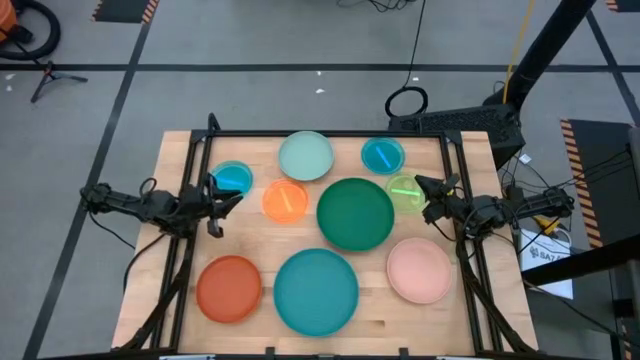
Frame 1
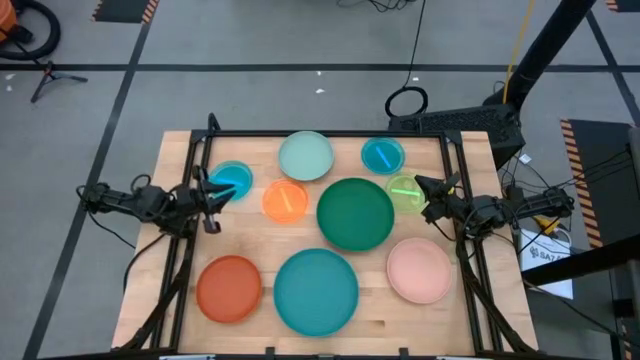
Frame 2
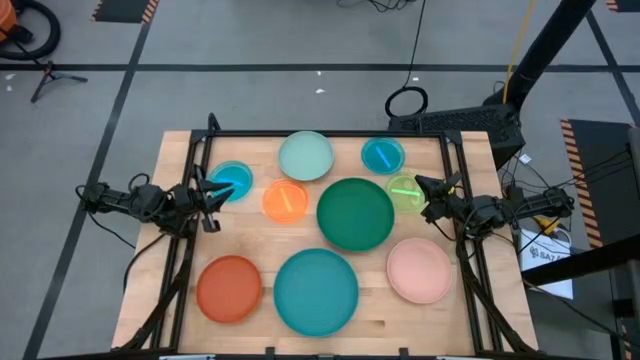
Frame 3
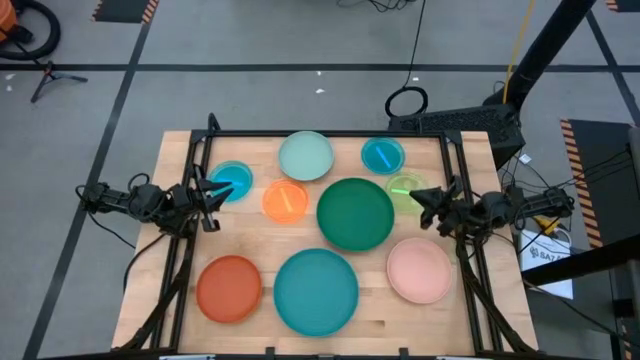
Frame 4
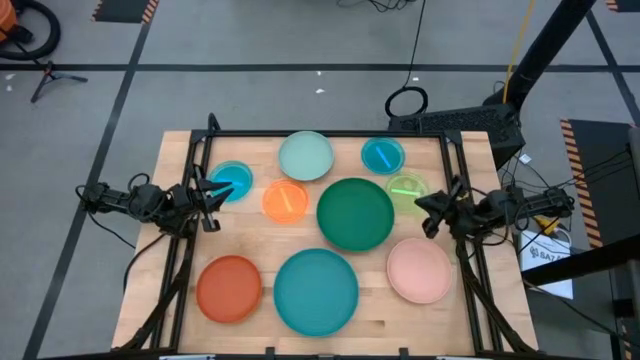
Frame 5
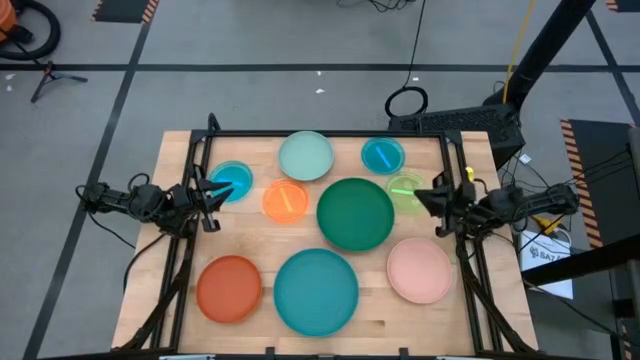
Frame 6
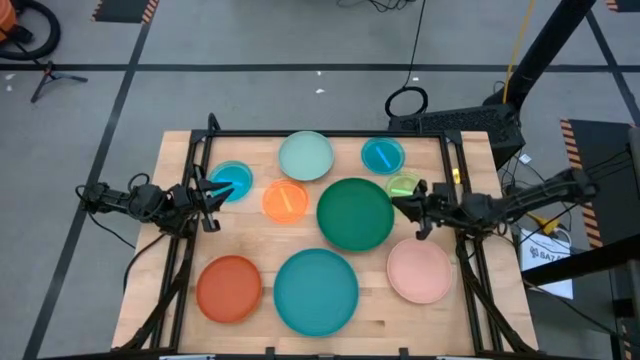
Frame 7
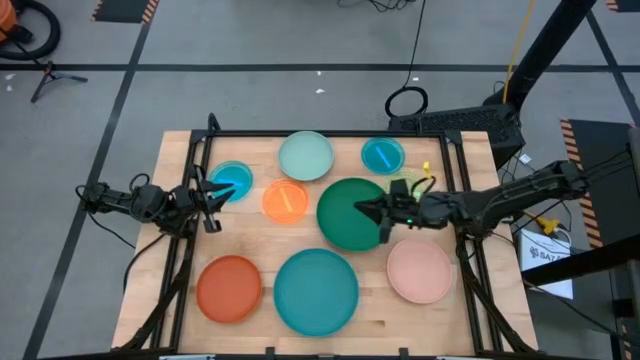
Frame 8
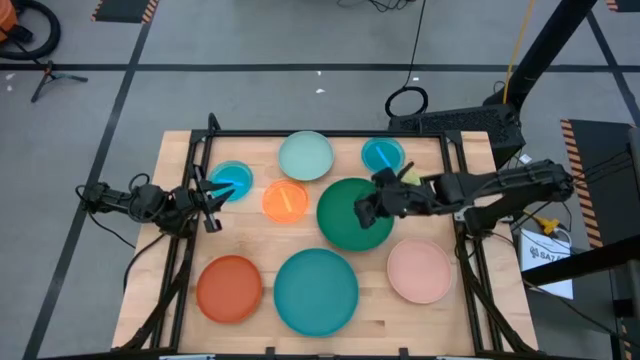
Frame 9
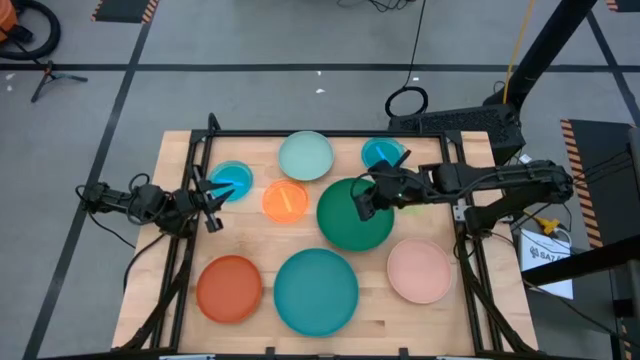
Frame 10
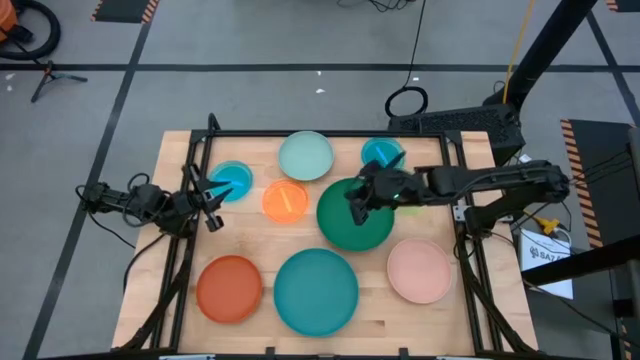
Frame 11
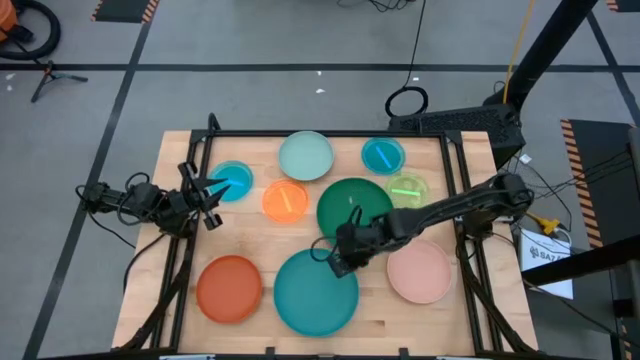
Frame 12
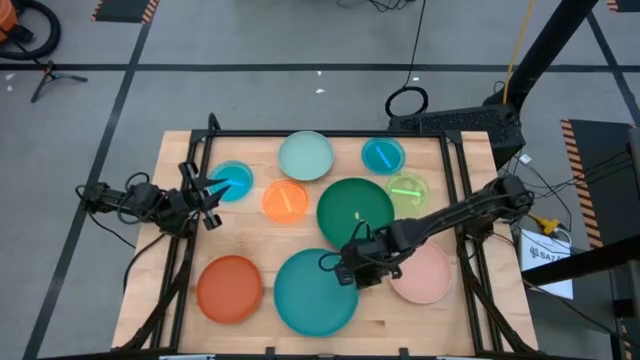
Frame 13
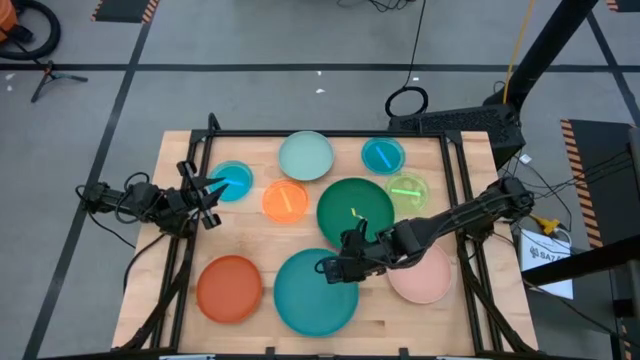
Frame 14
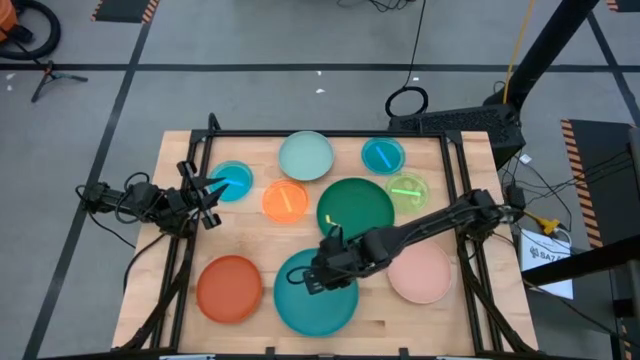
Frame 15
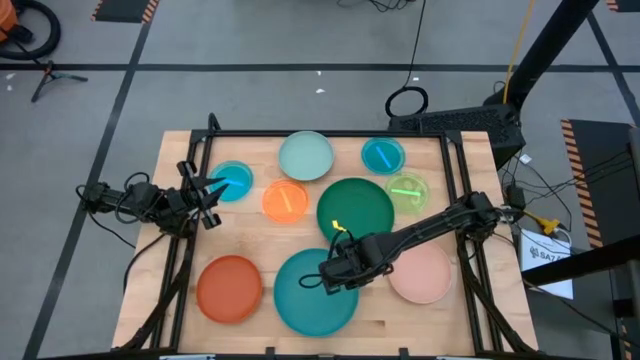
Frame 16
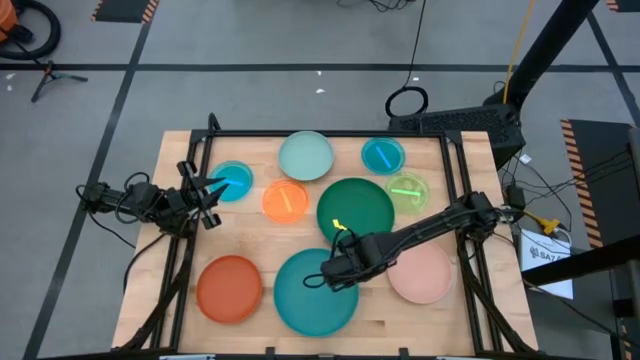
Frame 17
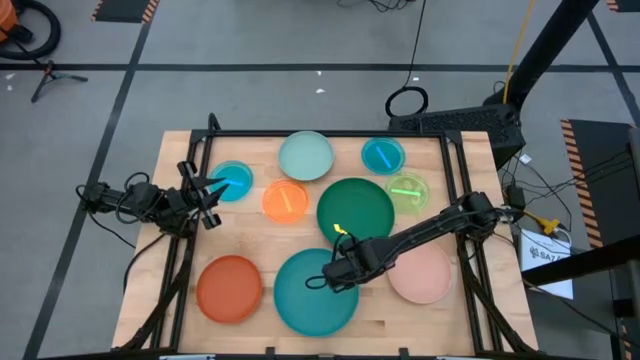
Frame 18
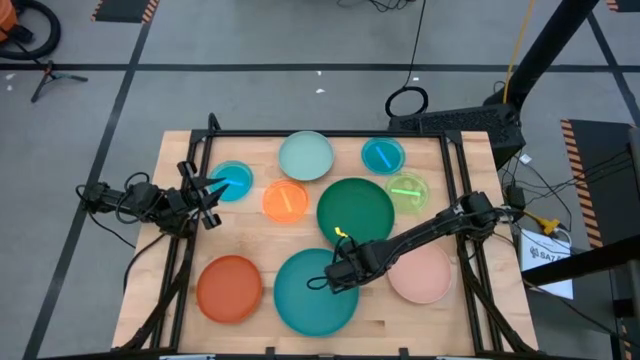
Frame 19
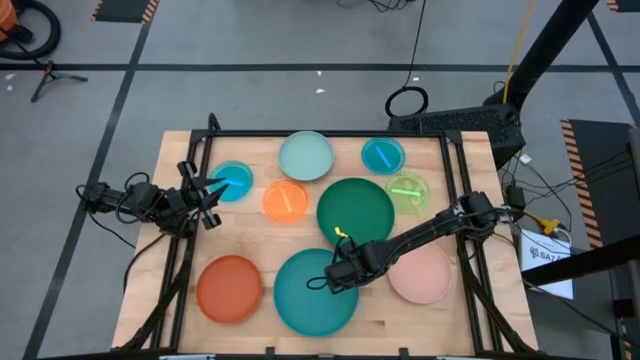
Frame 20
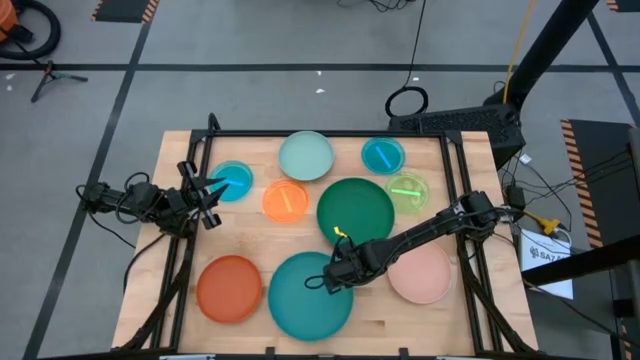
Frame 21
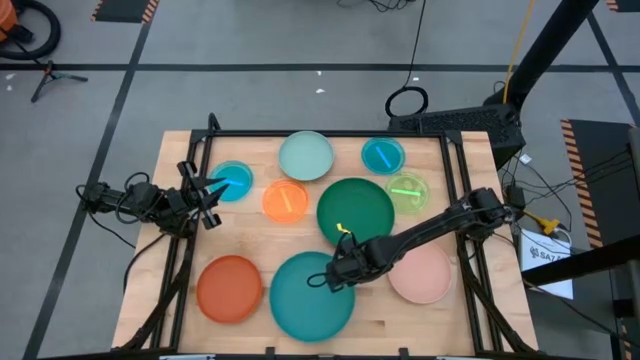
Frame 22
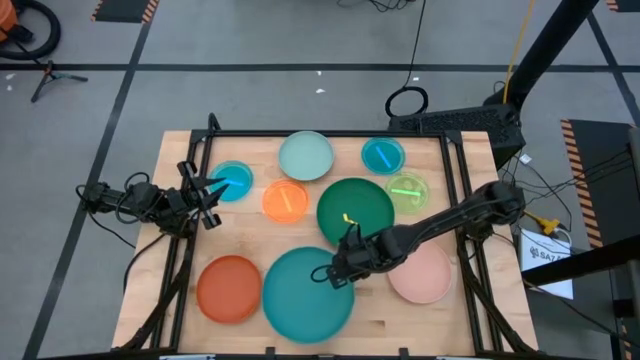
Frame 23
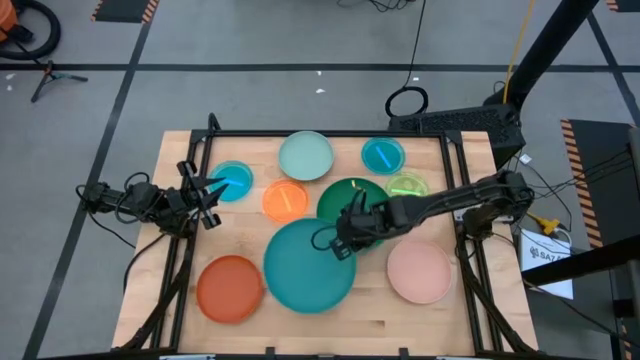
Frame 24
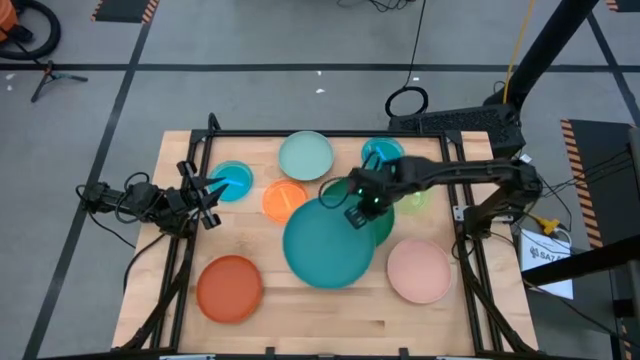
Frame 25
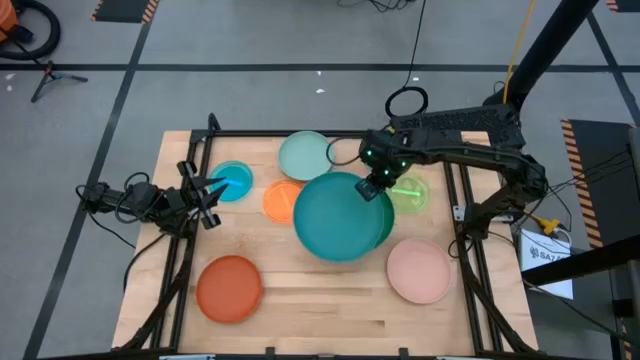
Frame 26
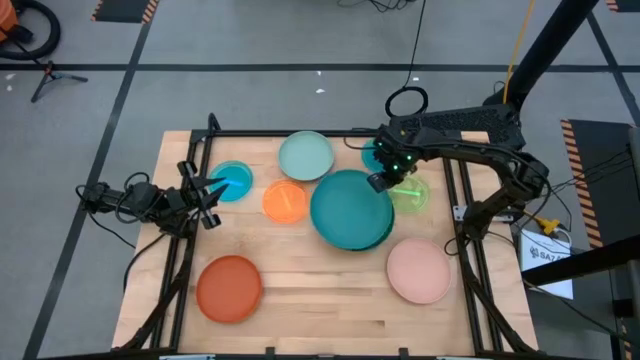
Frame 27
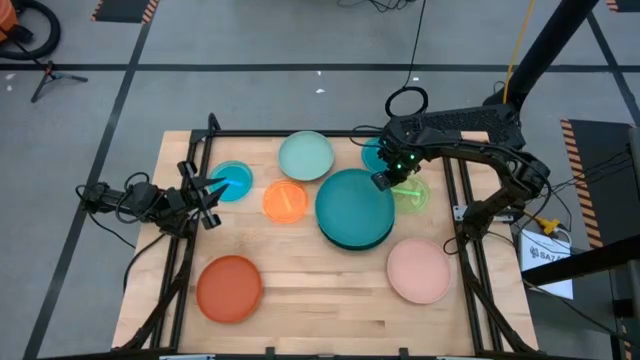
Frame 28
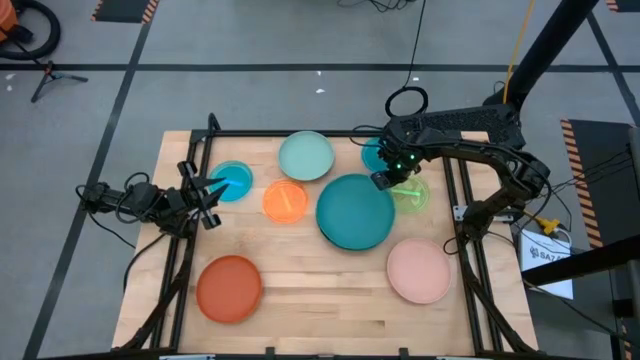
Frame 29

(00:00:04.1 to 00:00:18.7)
Task: Stack plastic plates
Stack the dark blue plate on top of the green plate

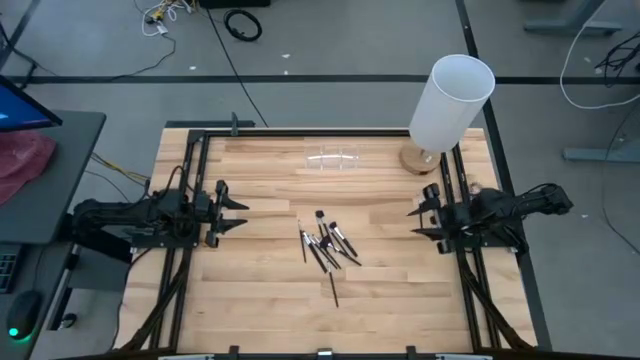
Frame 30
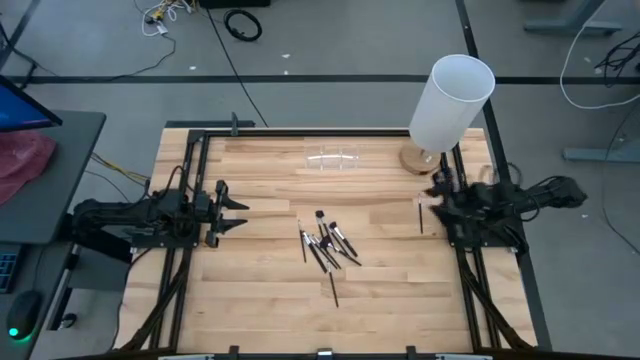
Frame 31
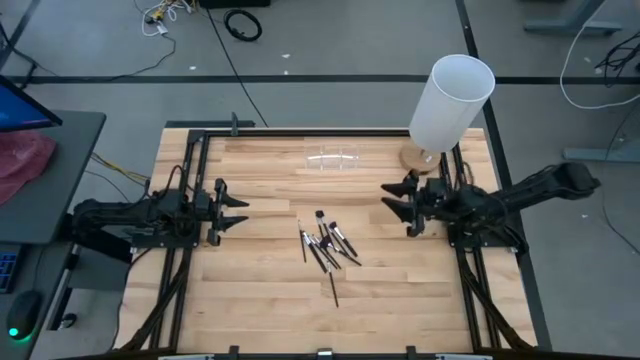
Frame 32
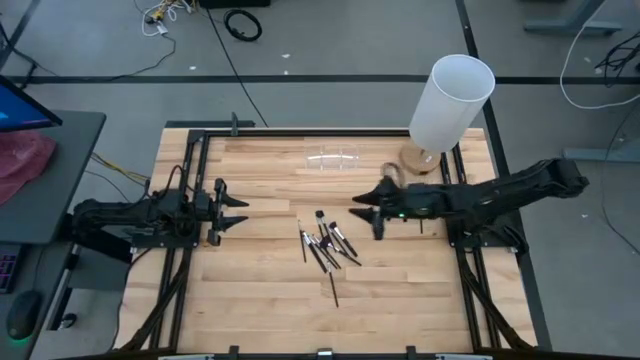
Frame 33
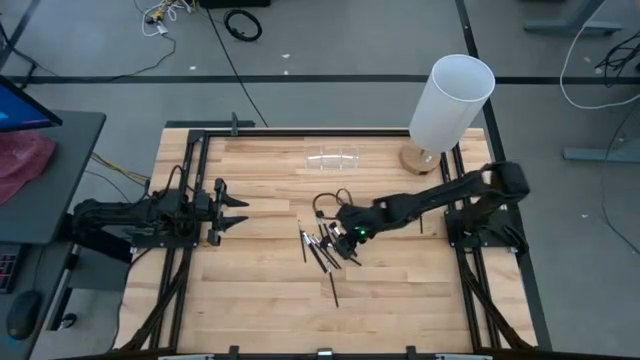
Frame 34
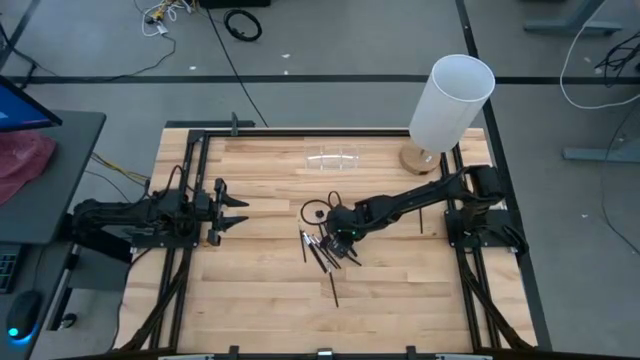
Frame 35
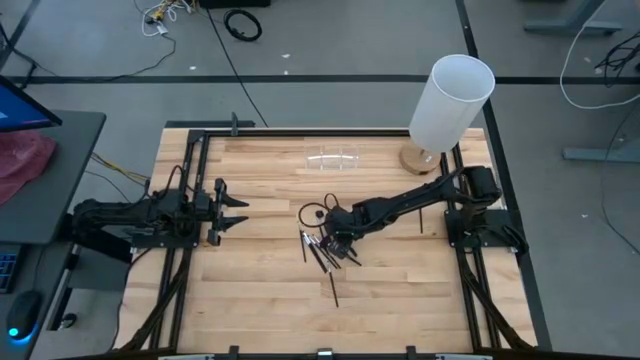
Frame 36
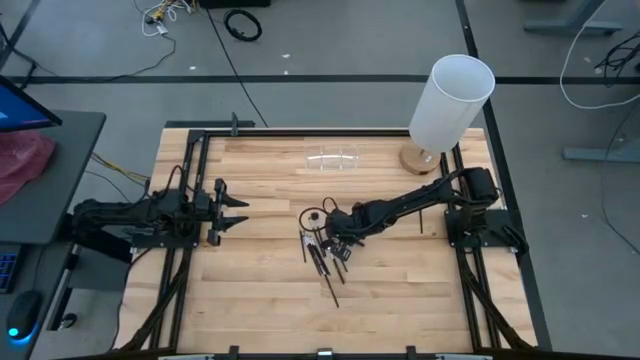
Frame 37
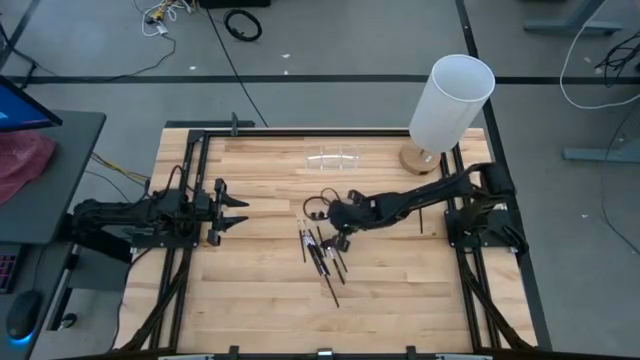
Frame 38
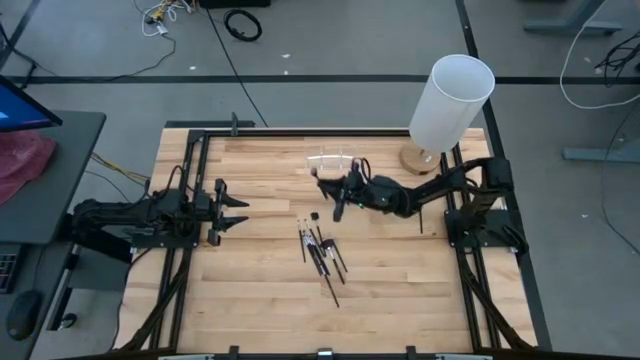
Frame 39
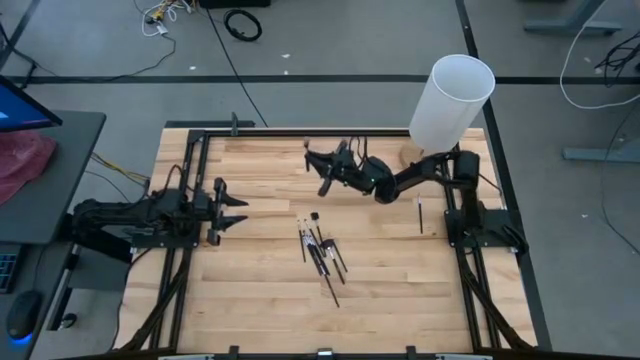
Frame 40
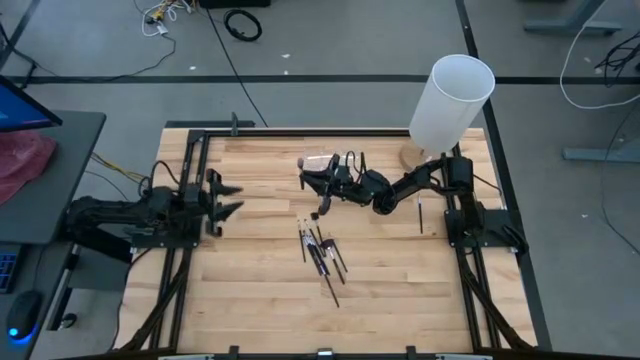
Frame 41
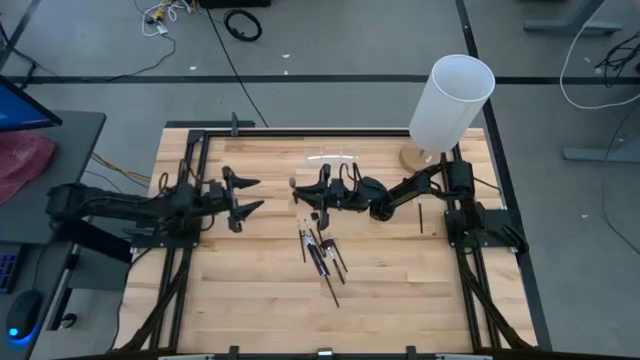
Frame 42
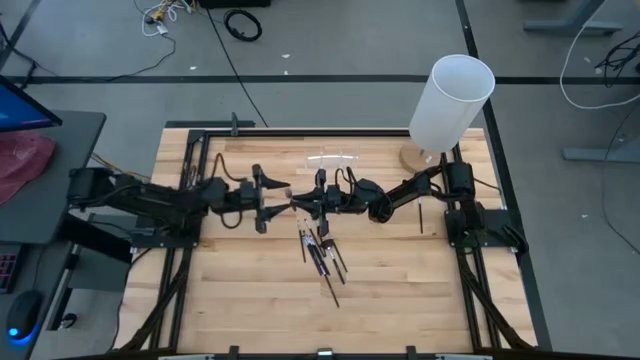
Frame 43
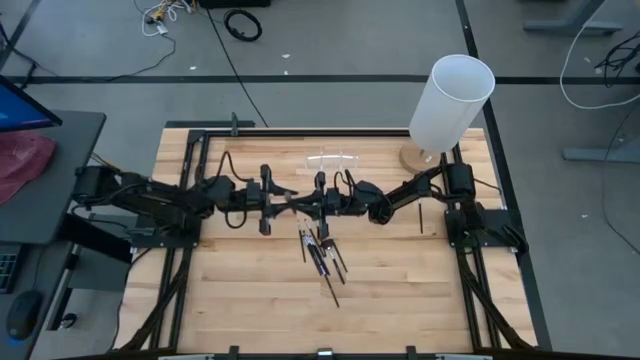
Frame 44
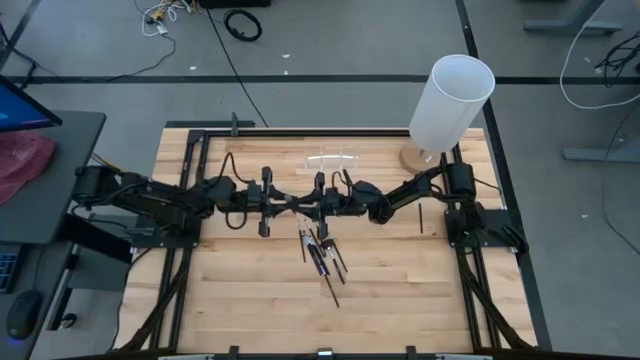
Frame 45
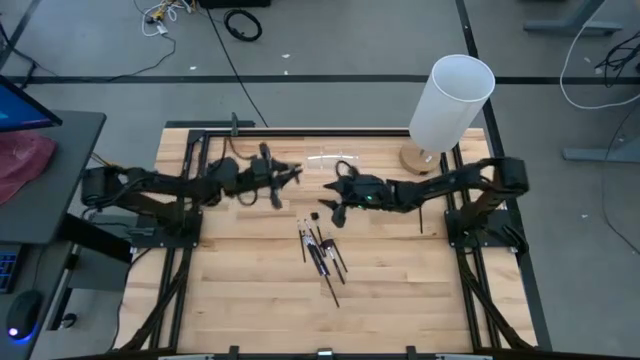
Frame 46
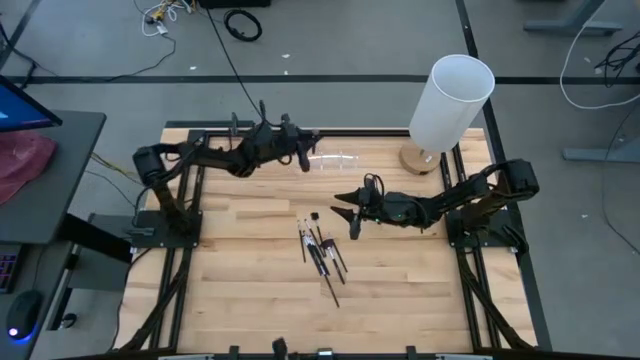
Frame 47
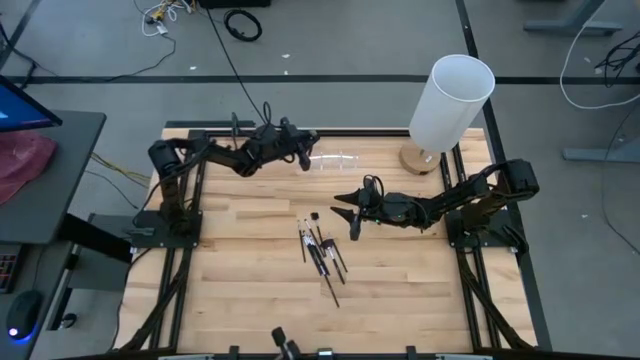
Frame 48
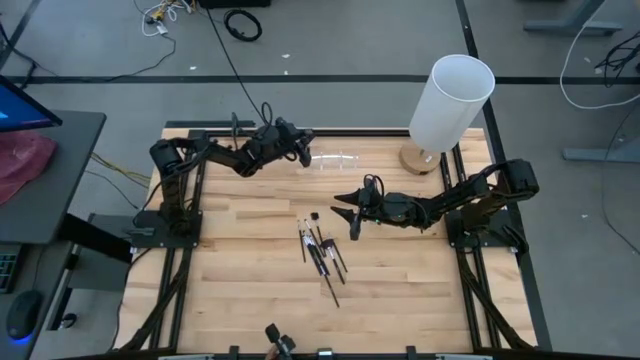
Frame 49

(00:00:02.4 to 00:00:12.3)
Task: Pick & Place Makeup Supplies
Put the black makeup brush into the transparent organizer
